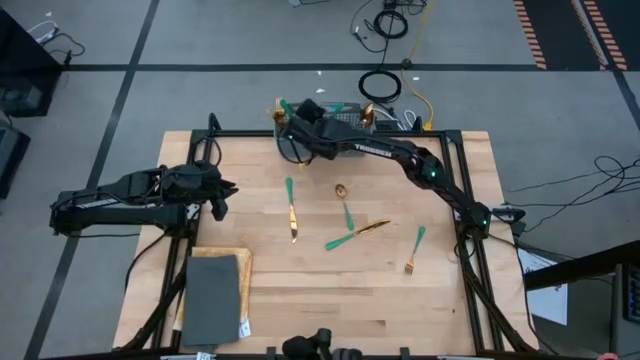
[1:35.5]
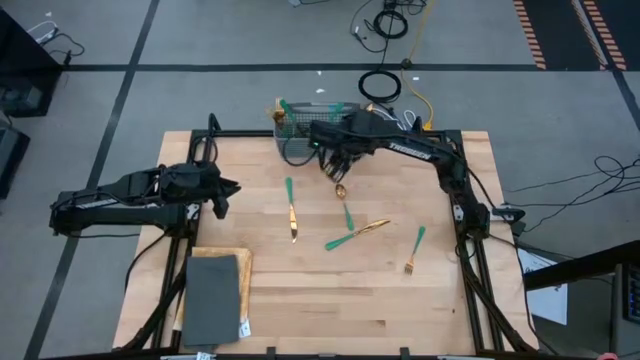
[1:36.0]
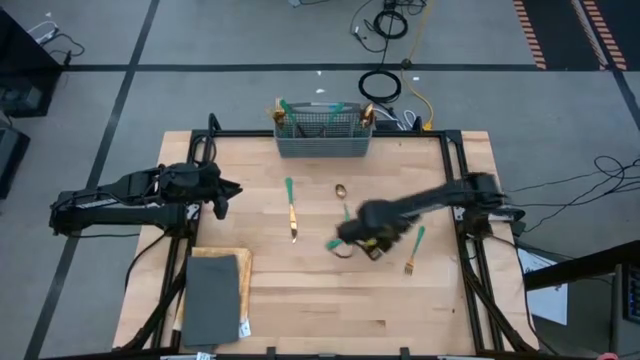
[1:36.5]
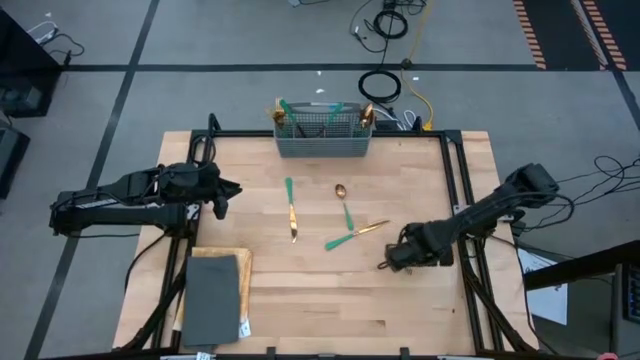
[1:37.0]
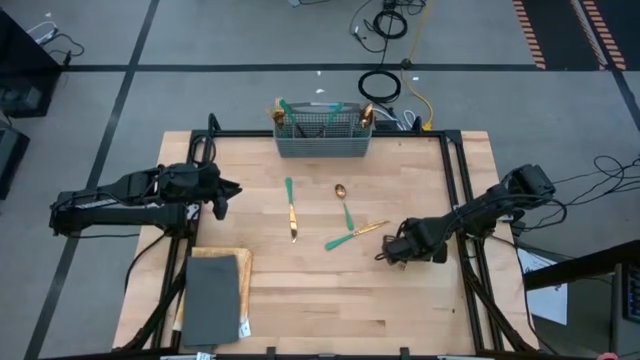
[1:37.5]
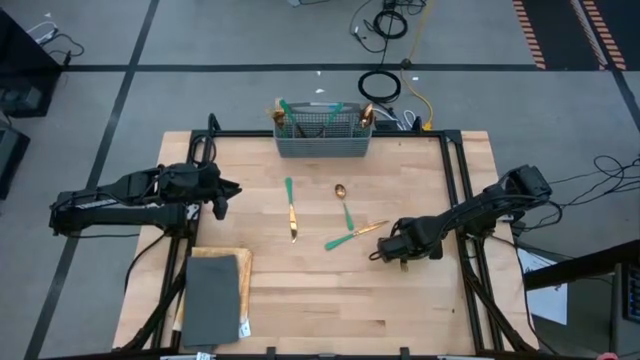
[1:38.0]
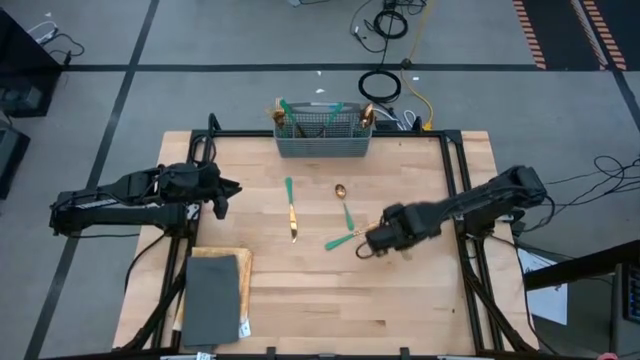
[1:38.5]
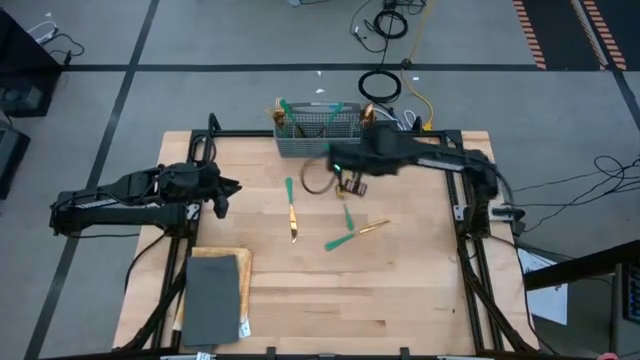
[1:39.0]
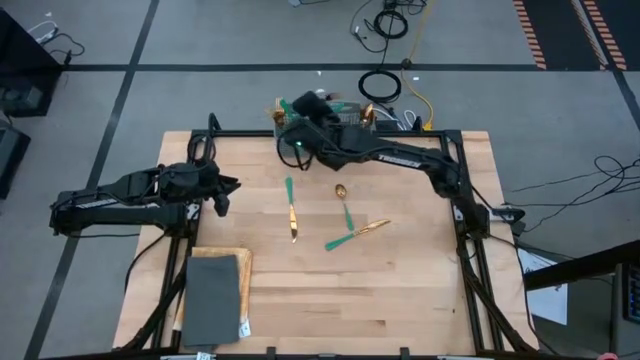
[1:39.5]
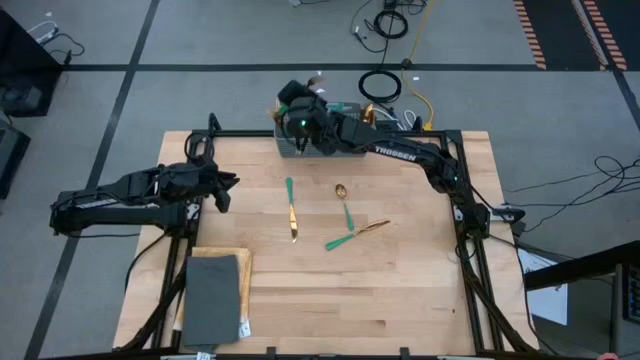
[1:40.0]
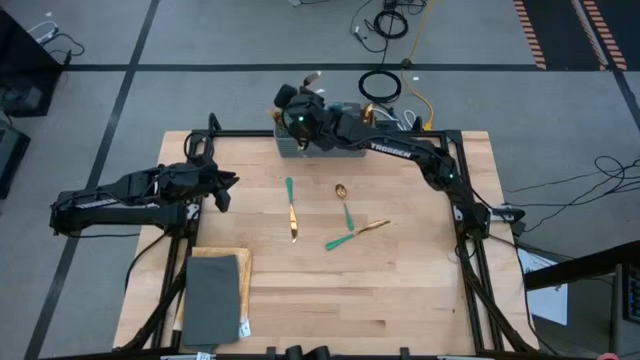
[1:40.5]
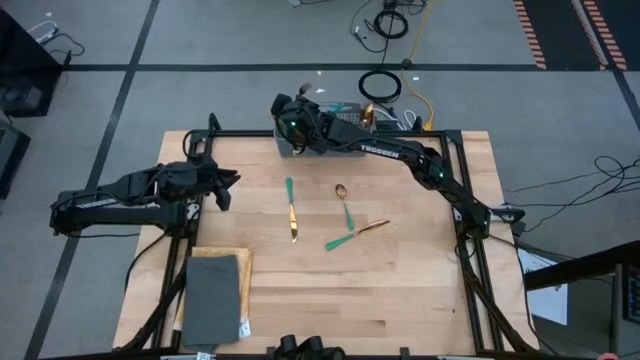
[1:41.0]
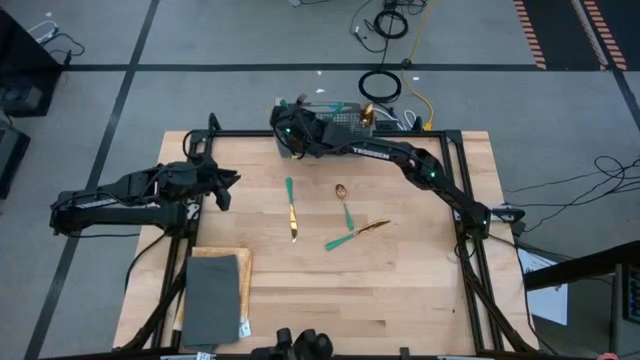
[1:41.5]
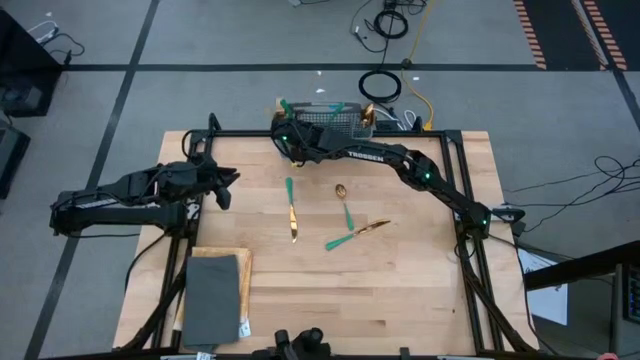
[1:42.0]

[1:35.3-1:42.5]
Task: Sort silverware
Put the green fork into the silverware basket

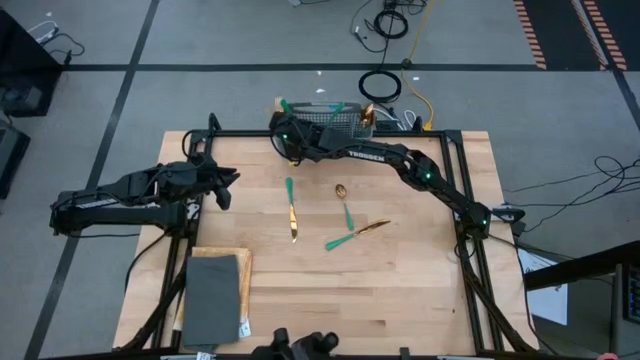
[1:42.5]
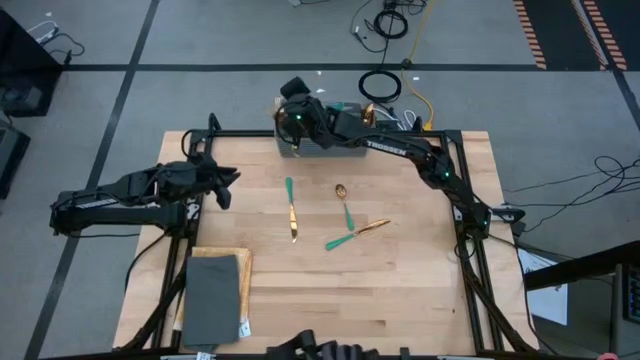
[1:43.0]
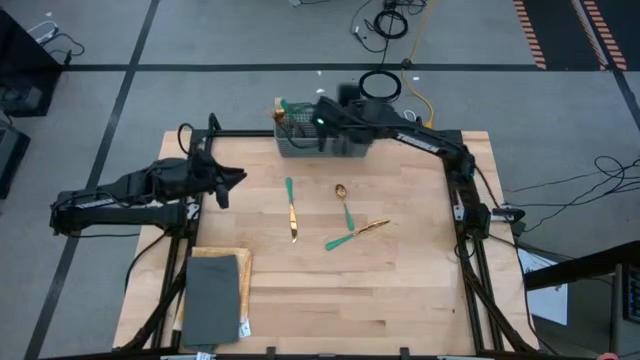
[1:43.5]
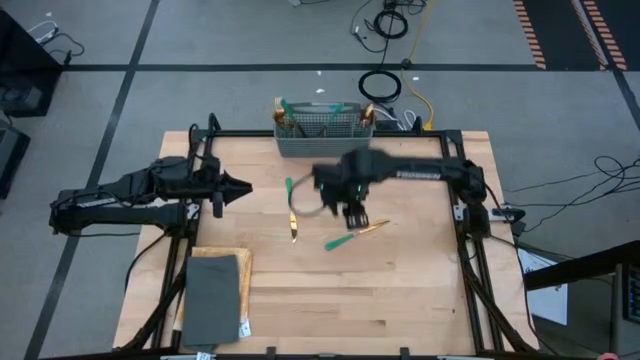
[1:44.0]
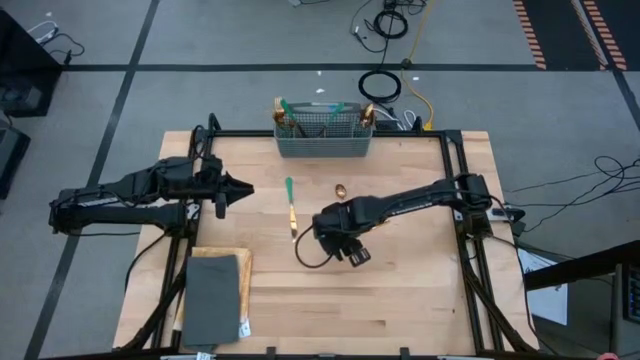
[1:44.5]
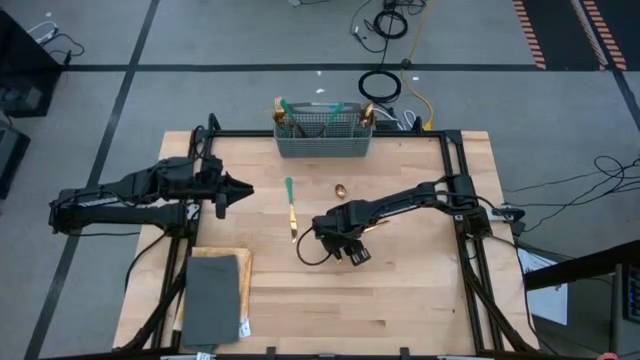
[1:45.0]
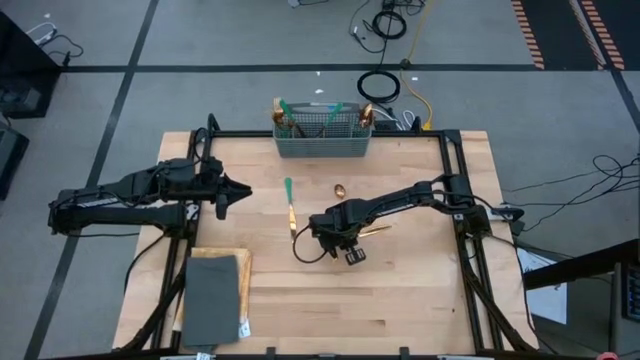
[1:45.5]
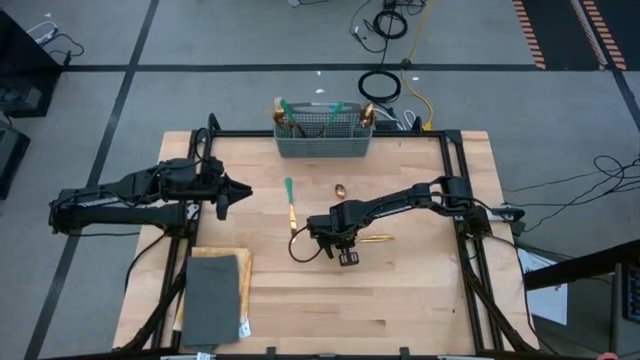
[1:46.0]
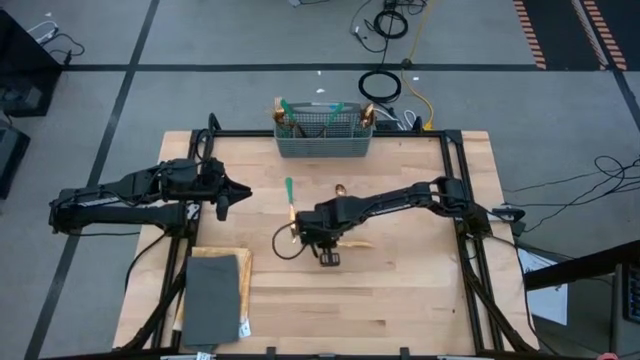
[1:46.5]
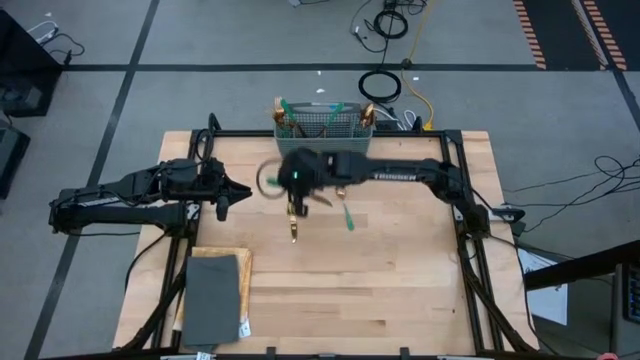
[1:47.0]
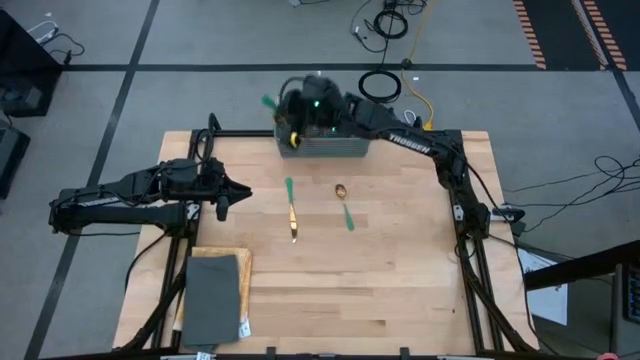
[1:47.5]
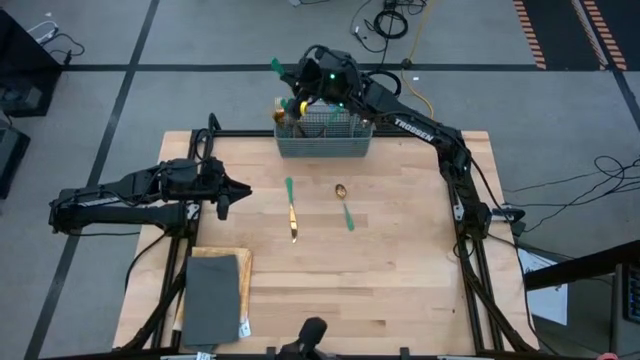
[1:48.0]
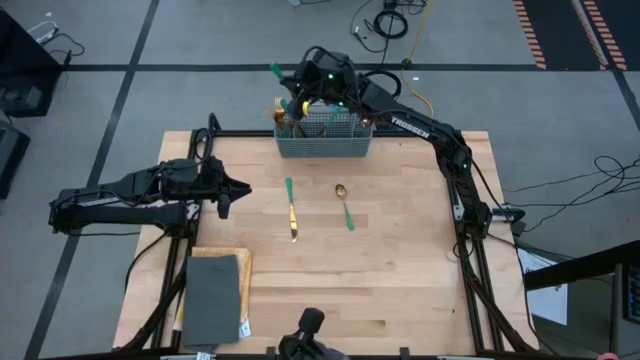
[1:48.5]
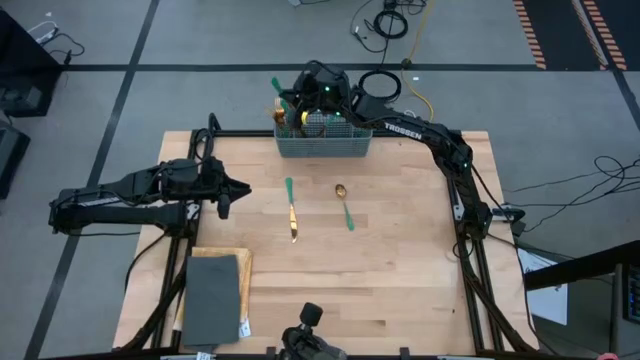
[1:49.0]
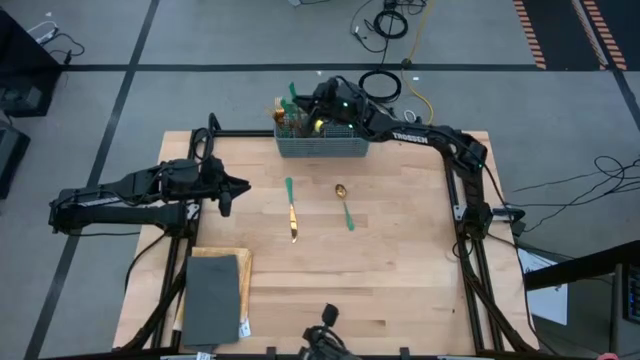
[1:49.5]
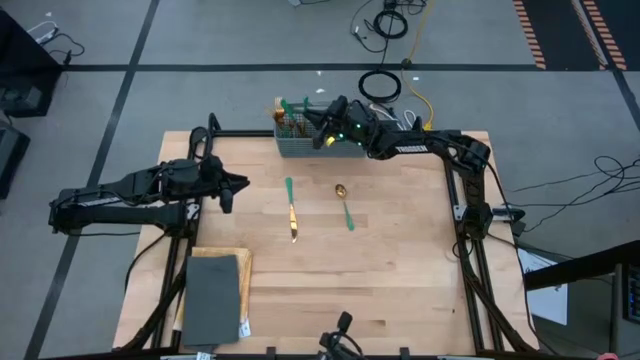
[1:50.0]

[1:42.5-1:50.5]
Put the green knife into the silverware basket

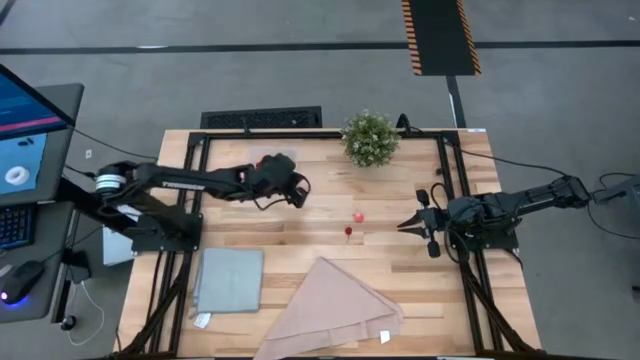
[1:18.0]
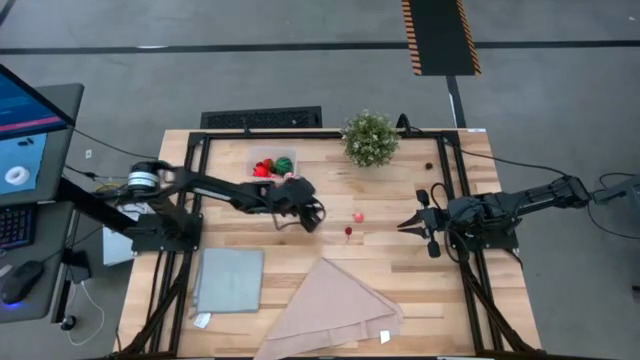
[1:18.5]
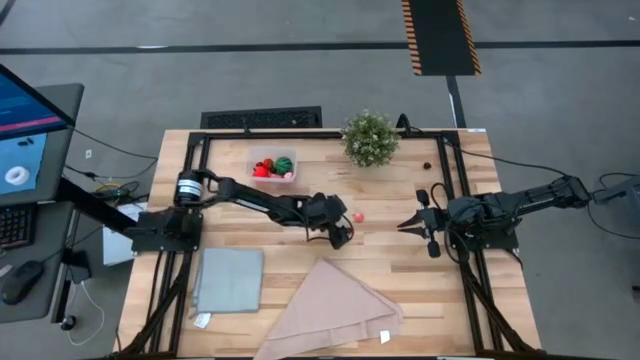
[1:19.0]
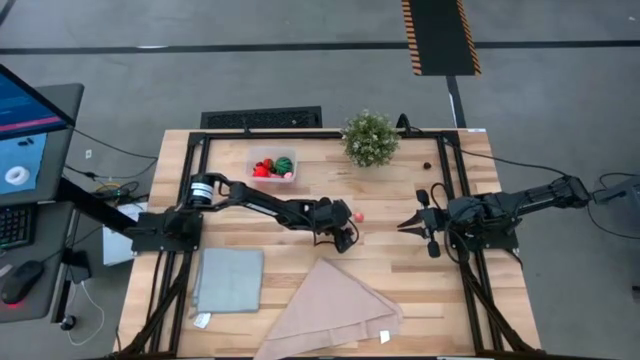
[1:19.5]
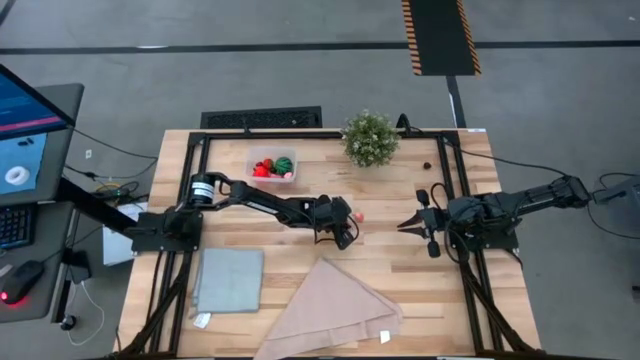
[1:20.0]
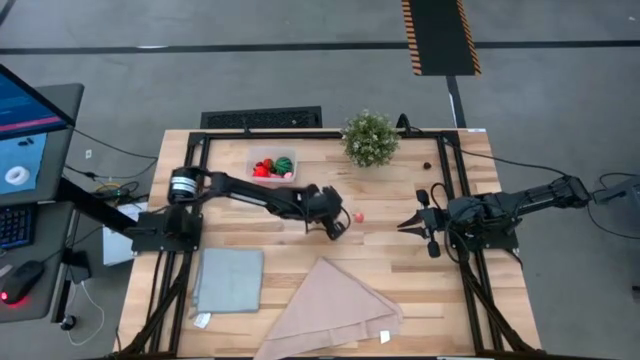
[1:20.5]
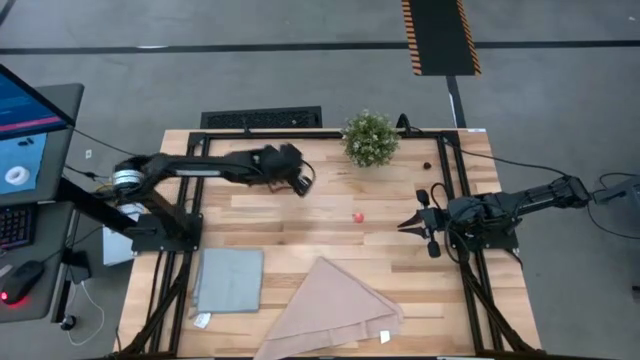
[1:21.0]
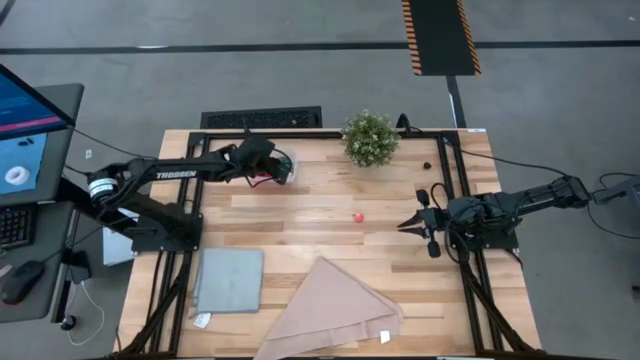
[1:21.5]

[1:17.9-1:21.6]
Task: Pick and placing Produce into tupperware
Put the red cherry into the transparent container
